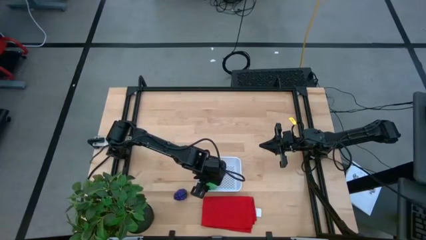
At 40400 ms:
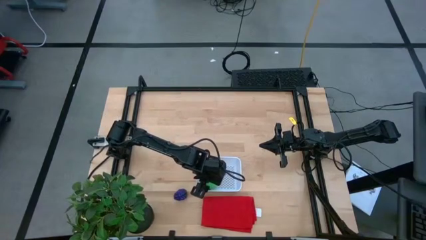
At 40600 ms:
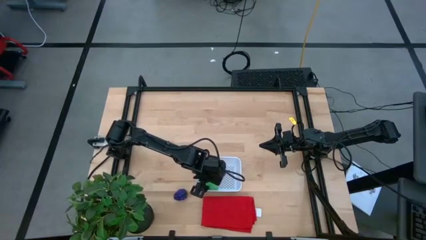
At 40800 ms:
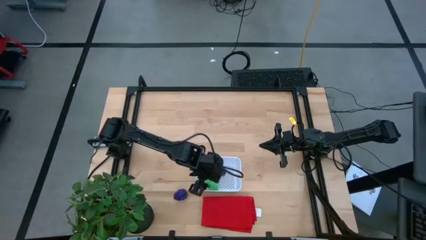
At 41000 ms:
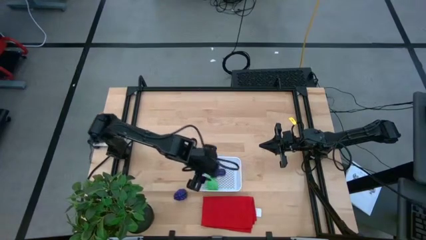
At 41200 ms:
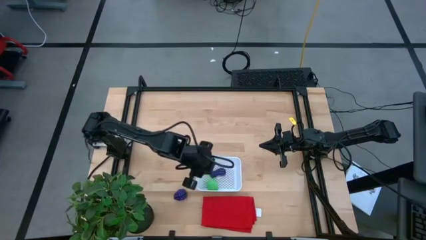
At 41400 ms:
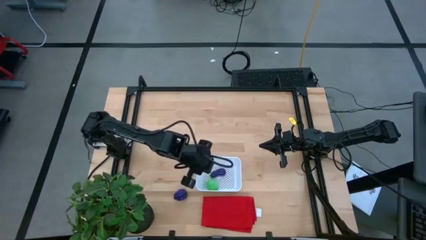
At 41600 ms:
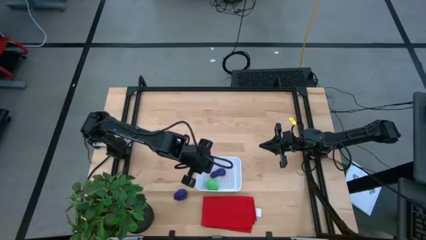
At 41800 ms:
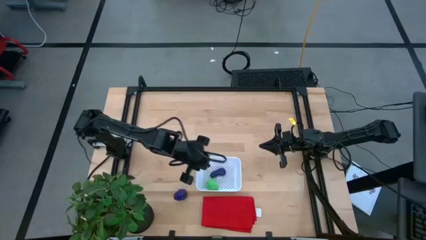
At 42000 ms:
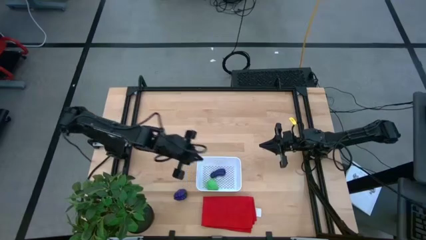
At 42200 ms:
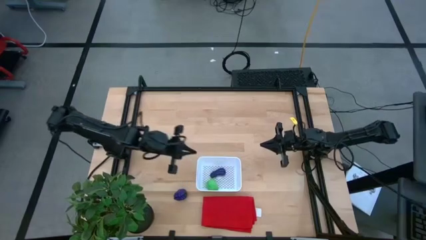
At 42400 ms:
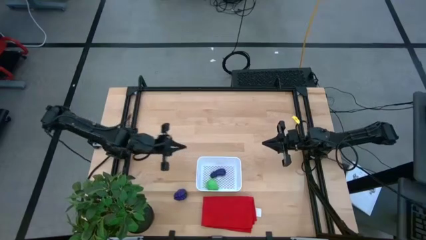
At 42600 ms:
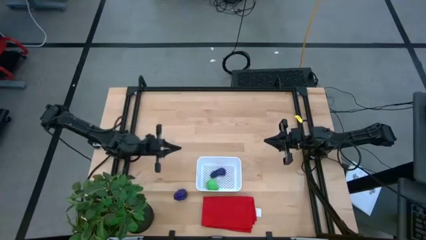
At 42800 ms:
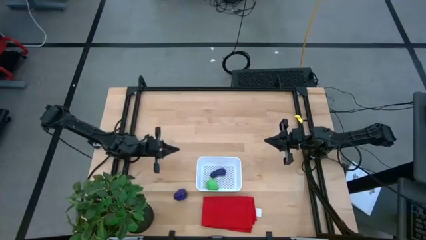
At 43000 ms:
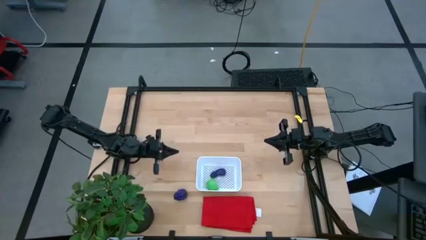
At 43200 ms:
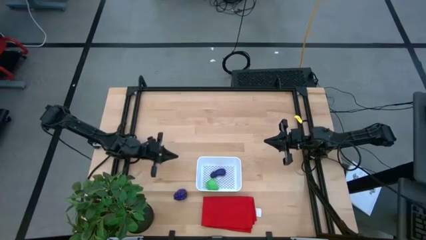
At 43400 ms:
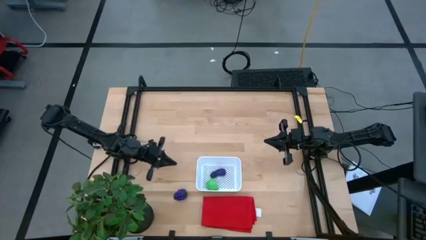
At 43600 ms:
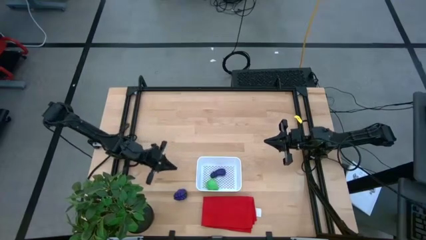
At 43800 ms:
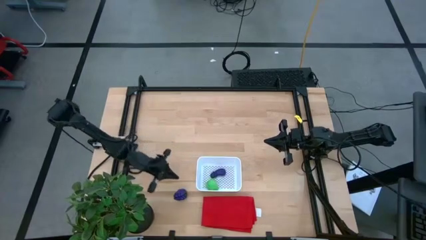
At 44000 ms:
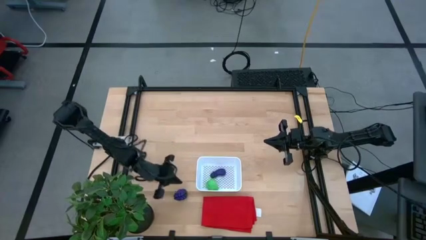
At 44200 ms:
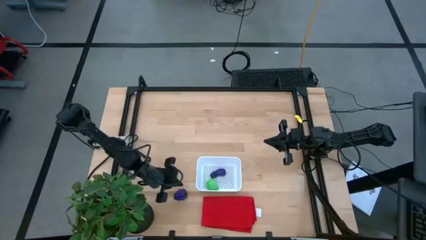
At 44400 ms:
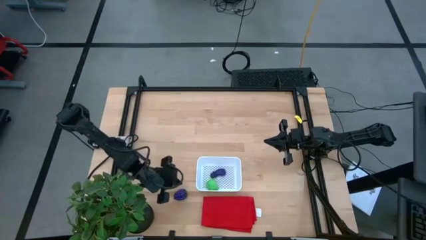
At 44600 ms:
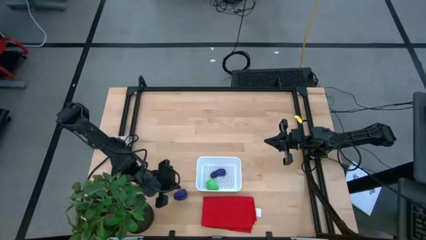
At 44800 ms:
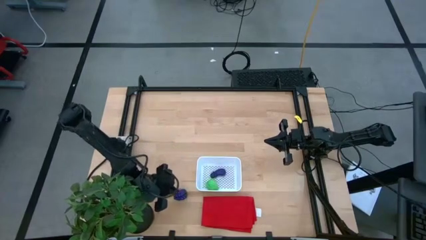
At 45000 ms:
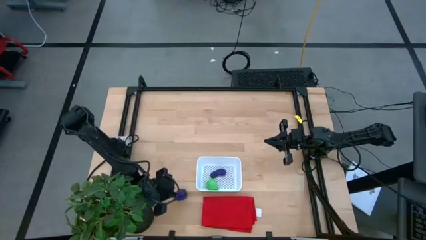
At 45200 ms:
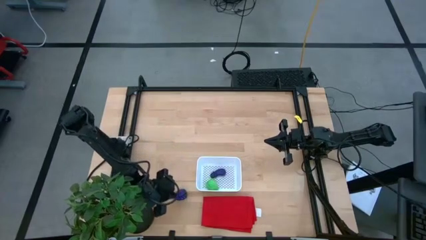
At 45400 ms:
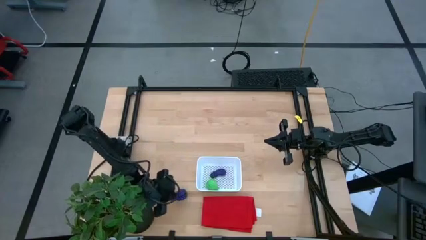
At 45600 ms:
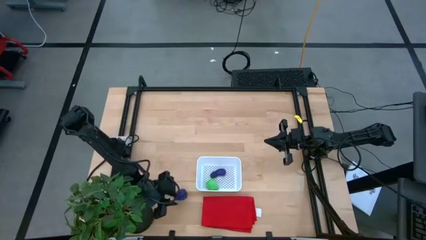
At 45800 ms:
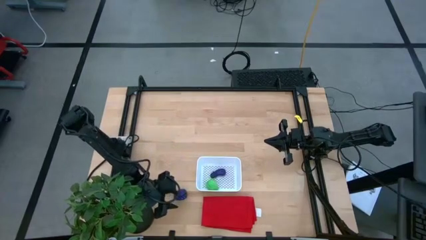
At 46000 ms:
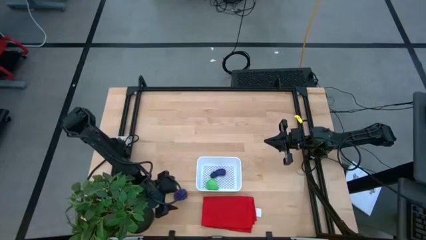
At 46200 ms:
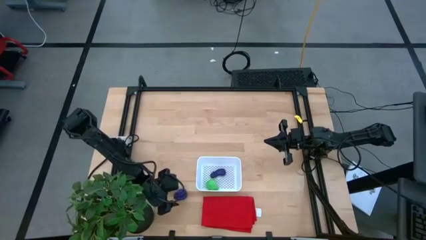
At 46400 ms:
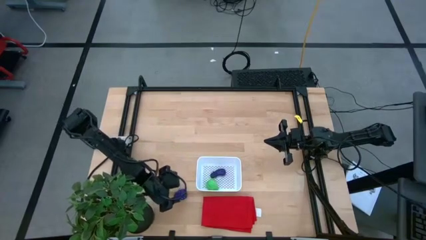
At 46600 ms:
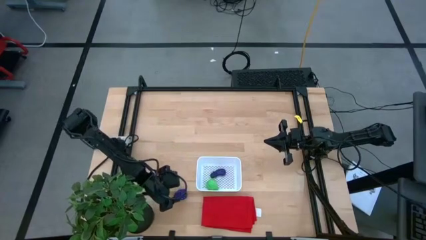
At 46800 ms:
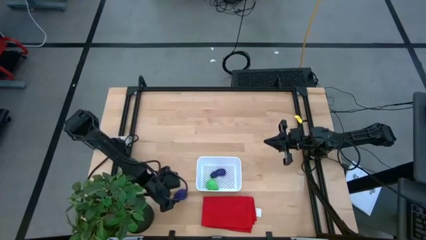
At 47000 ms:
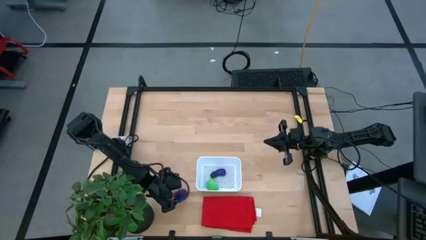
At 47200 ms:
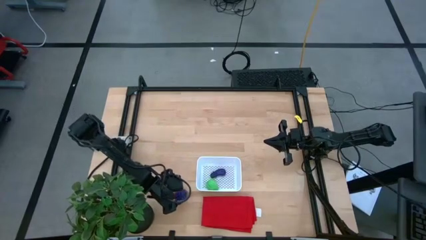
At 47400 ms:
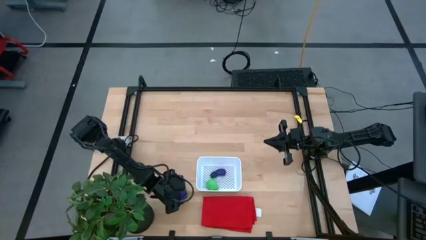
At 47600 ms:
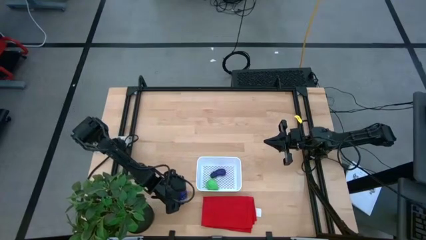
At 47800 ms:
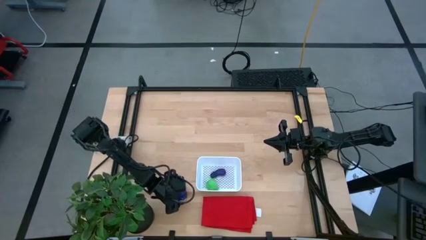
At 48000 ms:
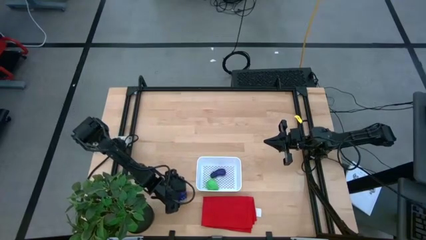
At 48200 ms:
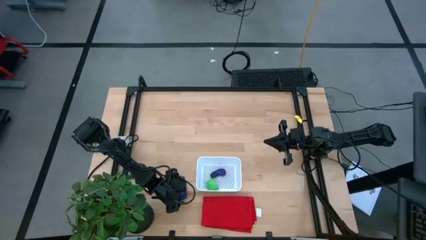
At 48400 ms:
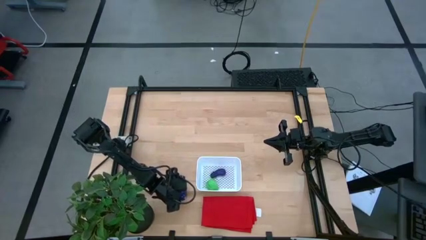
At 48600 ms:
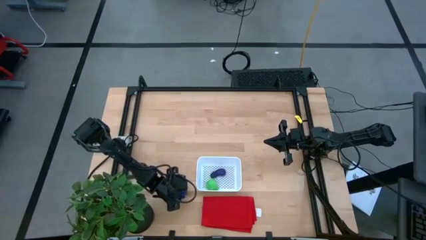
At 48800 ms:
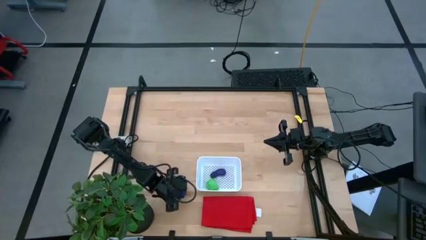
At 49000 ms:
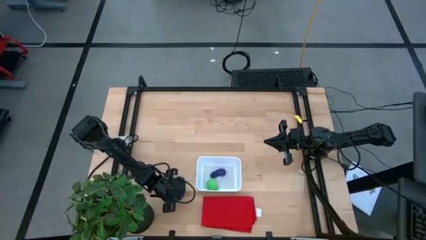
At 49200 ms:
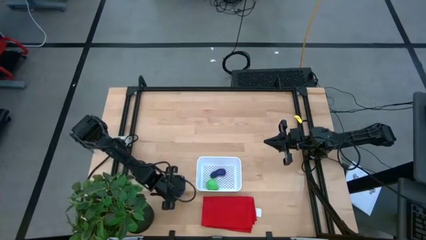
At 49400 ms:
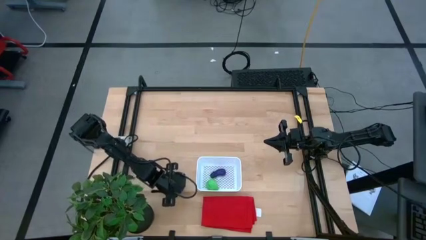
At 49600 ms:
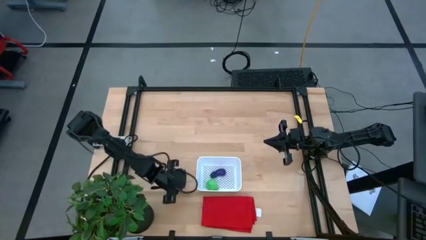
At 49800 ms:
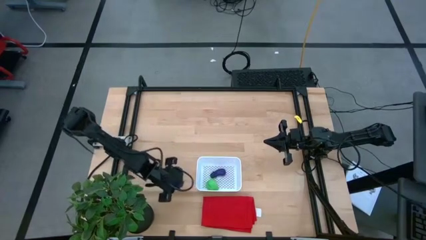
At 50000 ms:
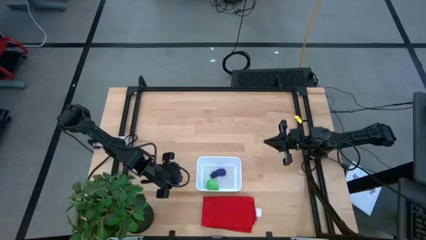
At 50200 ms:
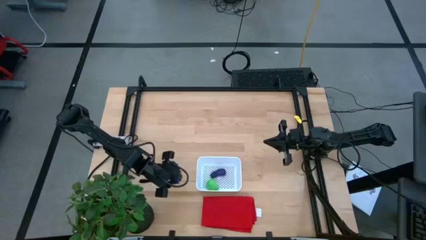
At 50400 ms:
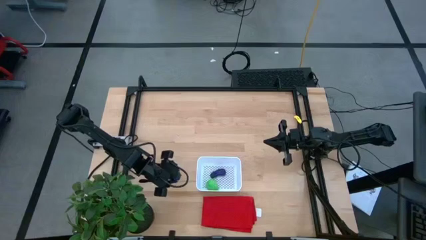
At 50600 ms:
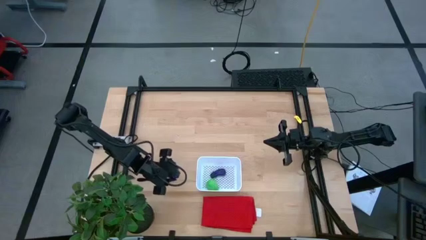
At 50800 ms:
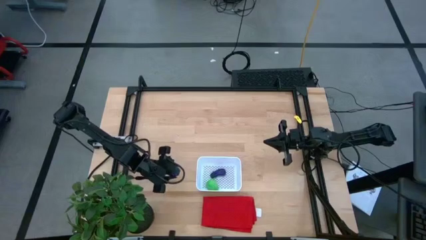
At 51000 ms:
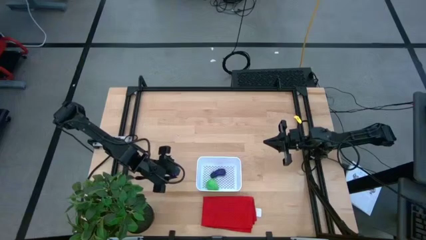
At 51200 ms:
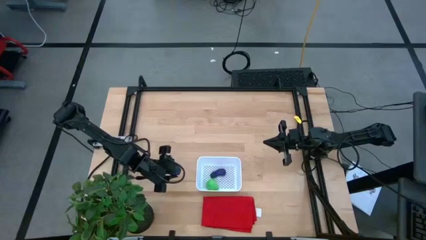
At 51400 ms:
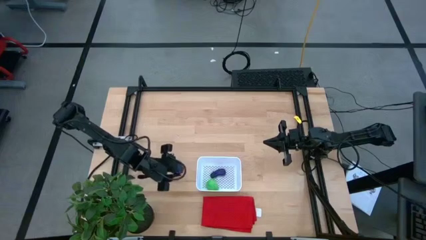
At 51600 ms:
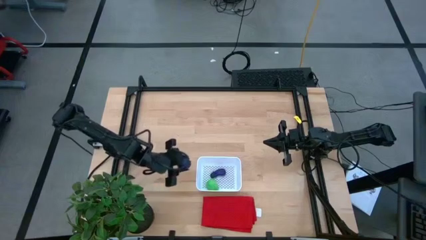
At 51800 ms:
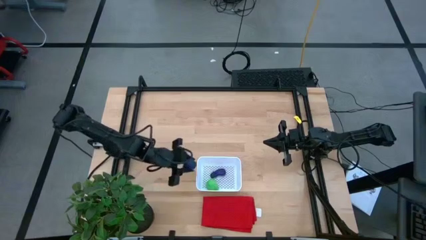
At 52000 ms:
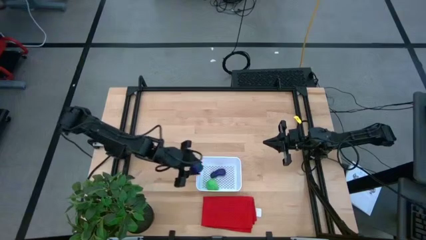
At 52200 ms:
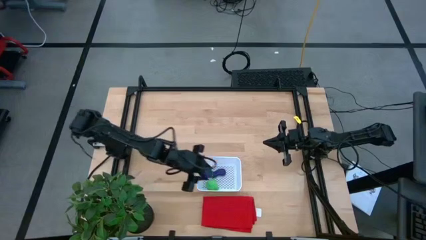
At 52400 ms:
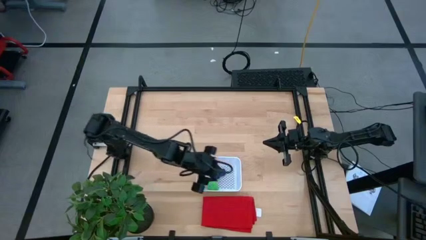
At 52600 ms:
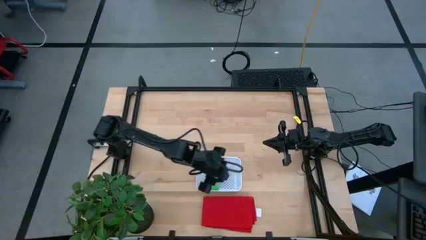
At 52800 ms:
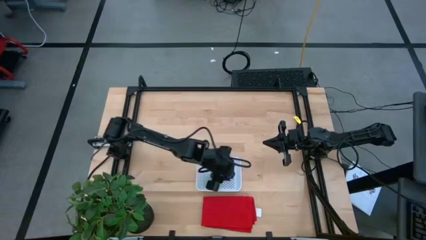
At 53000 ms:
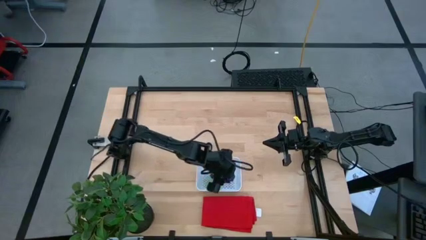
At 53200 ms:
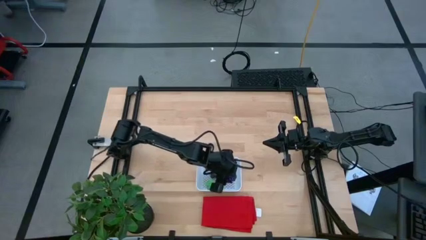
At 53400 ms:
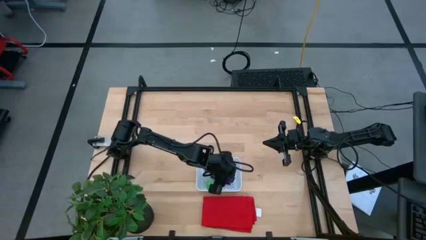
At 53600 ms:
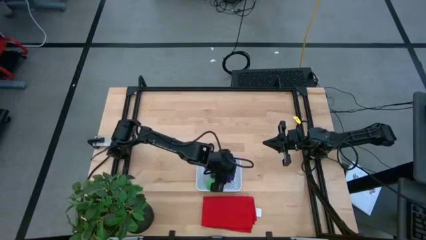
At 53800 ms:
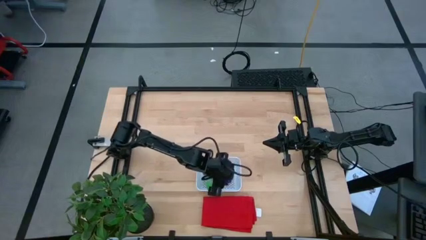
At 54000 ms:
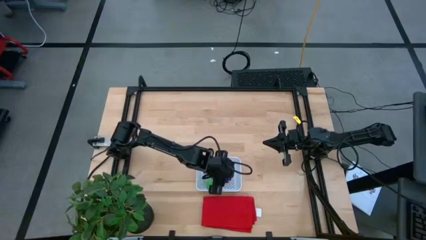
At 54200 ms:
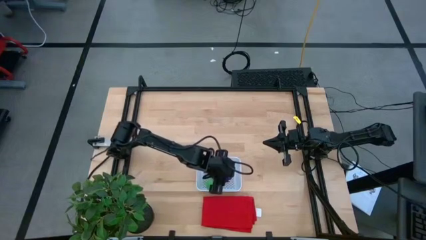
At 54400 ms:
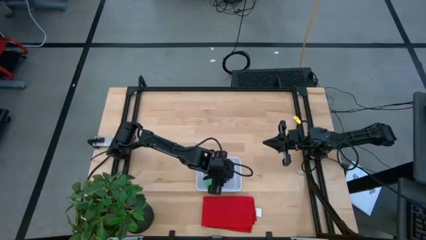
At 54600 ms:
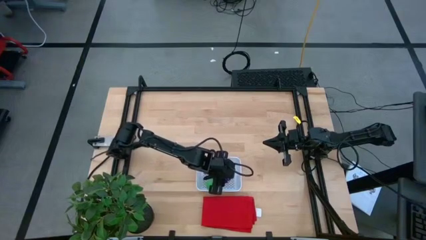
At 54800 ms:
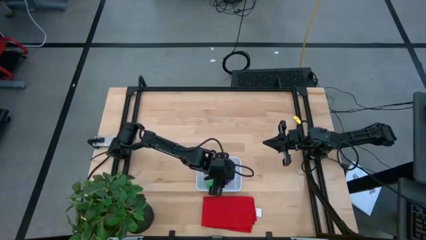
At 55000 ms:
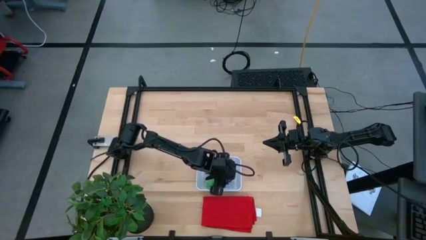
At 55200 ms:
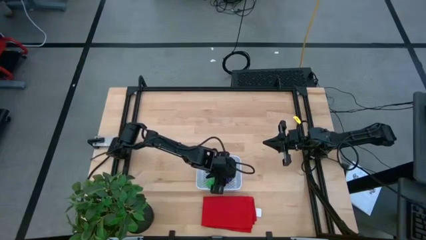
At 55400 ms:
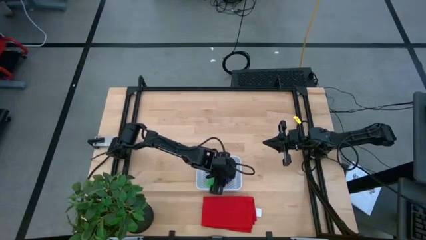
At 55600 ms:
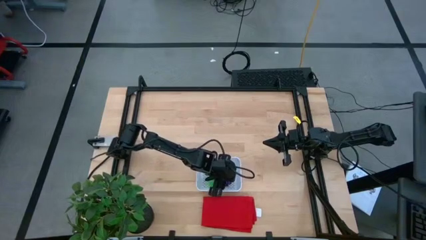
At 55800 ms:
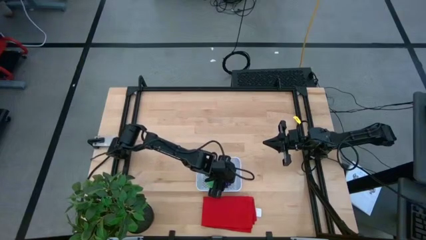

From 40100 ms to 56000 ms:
Task: Pick and placing Produce into tupperware
Put the blue grapes into the white bin

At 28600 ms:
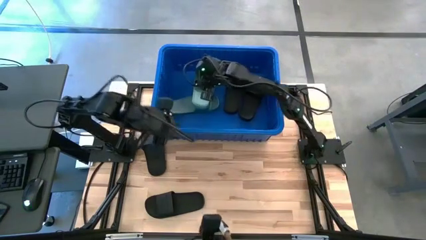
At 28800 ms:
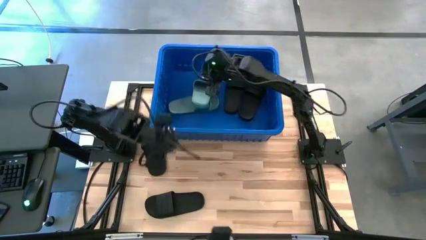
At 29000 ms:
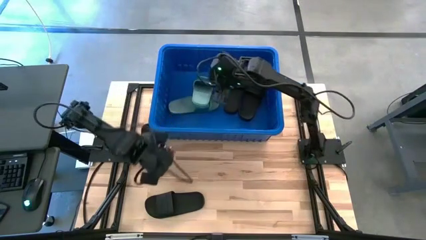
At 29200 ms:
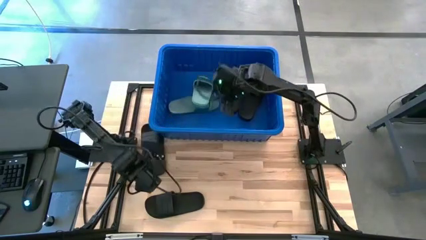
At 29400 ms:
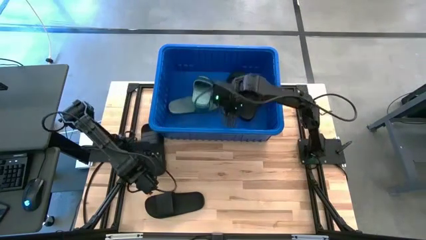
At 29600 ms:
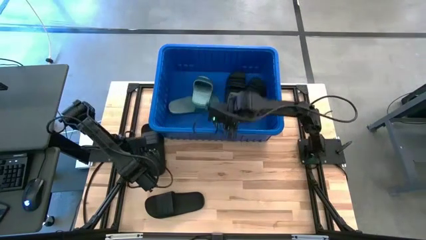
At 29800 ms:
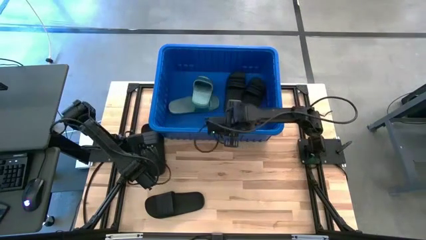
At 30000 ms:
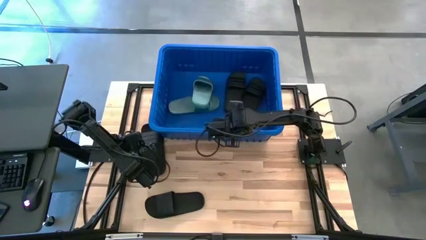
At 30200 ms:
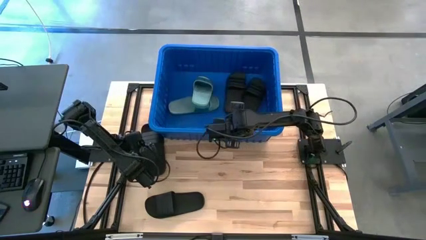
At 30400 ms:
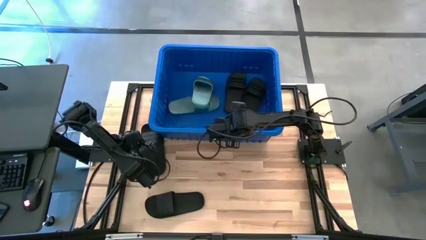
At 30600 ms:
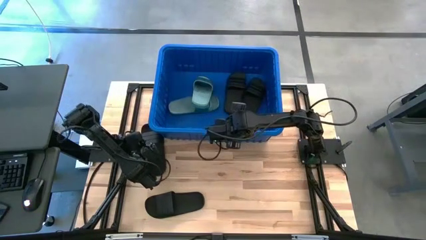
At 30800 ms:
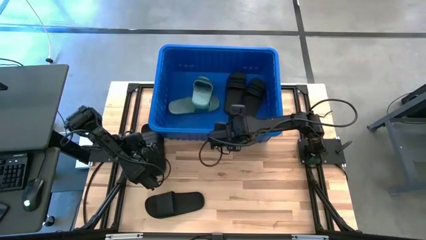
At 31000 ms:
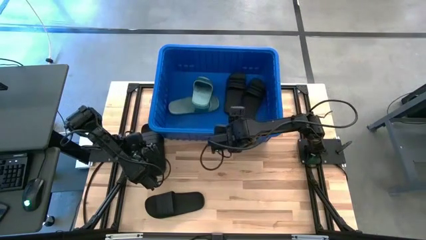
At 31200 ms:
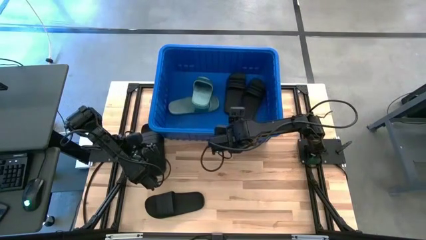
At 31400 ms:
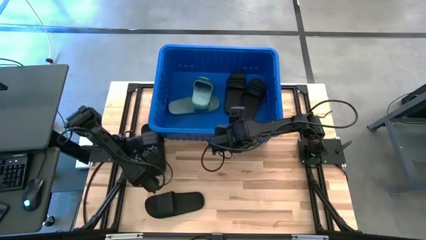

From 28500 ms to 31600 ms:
Task: Pick and place slides into bin
Put the black slipper into the blue bin
